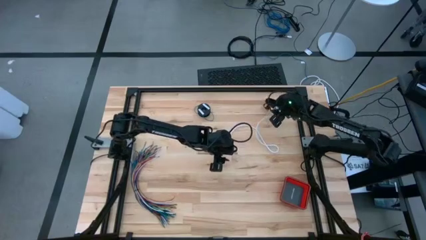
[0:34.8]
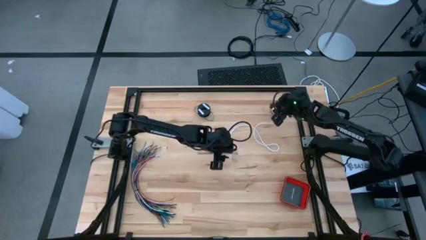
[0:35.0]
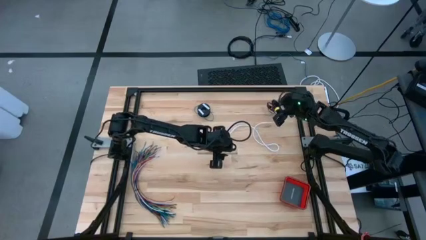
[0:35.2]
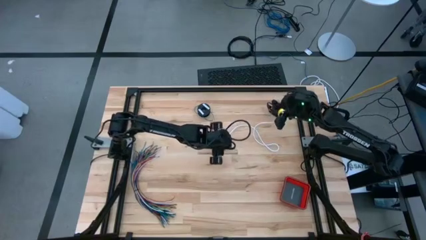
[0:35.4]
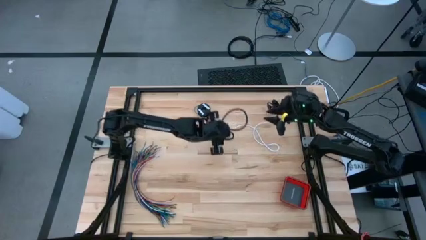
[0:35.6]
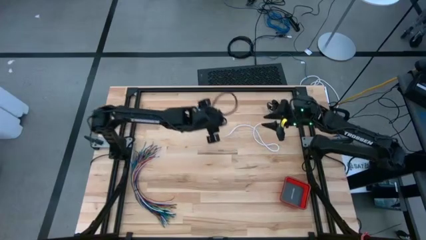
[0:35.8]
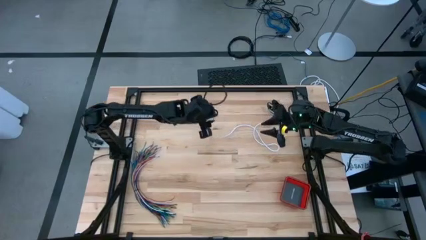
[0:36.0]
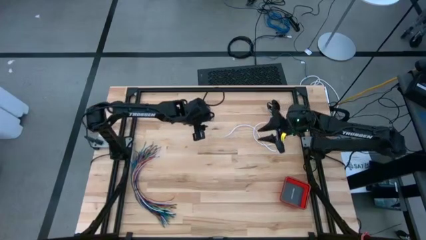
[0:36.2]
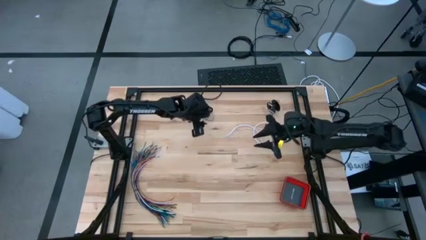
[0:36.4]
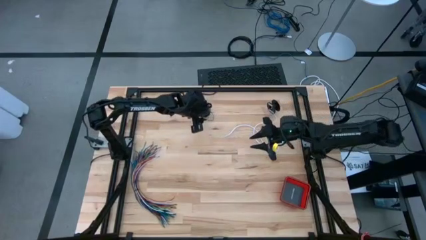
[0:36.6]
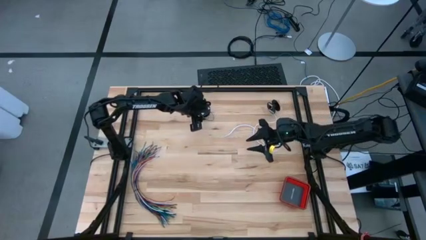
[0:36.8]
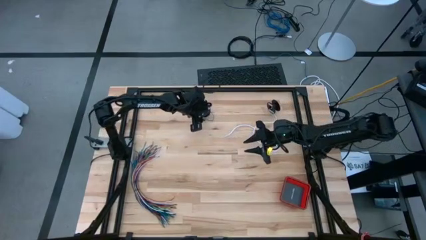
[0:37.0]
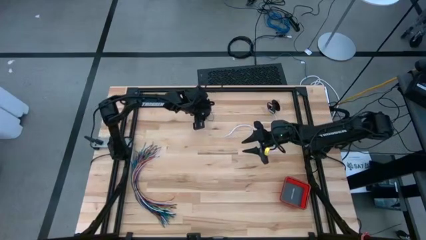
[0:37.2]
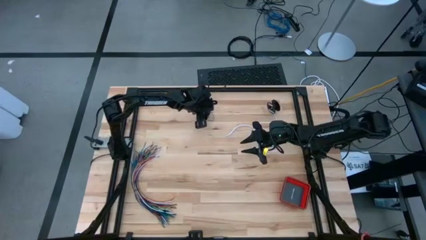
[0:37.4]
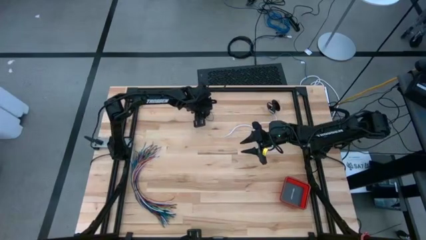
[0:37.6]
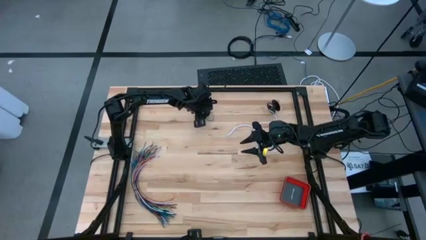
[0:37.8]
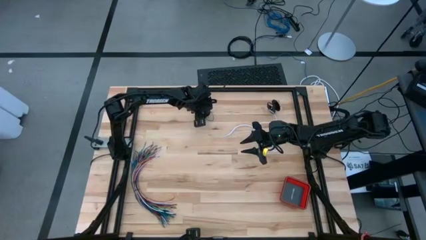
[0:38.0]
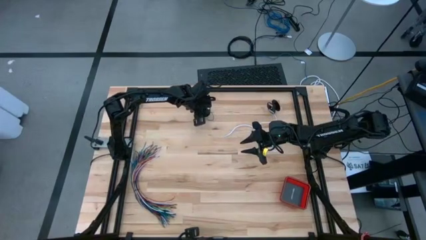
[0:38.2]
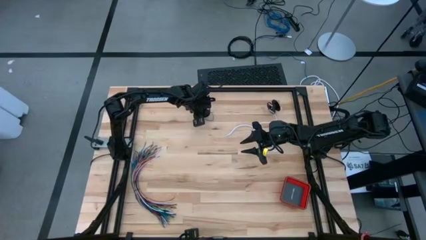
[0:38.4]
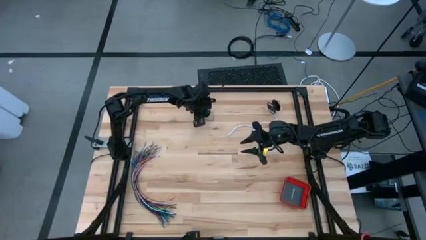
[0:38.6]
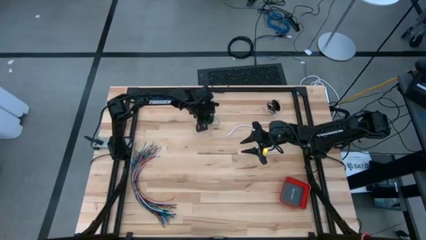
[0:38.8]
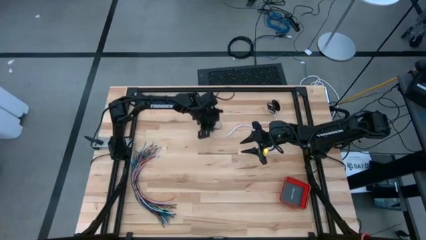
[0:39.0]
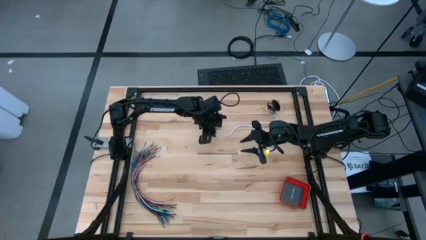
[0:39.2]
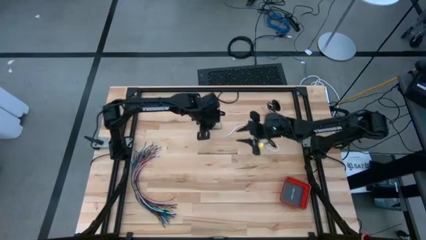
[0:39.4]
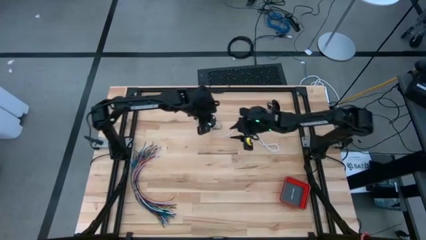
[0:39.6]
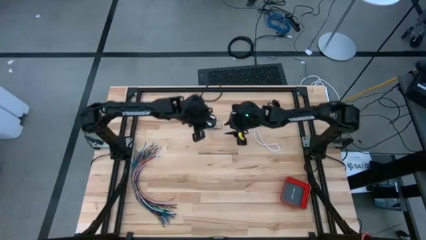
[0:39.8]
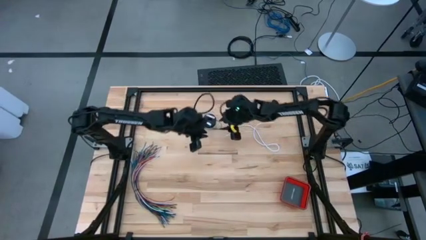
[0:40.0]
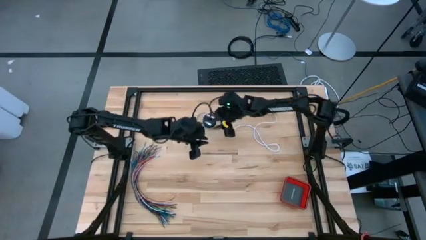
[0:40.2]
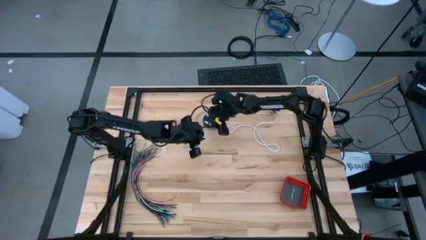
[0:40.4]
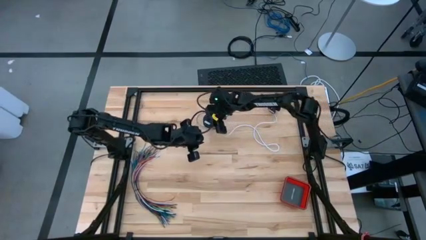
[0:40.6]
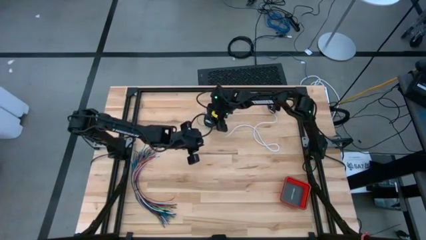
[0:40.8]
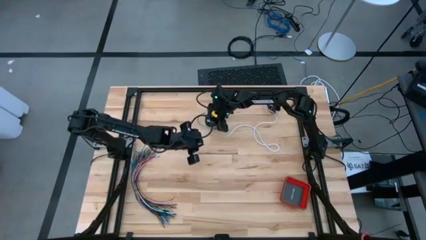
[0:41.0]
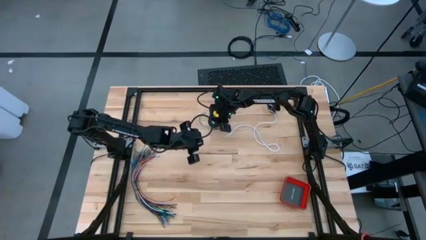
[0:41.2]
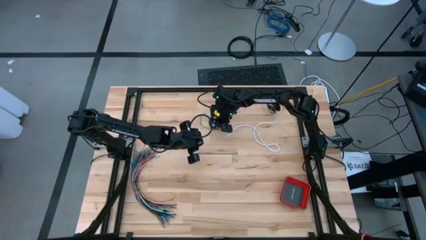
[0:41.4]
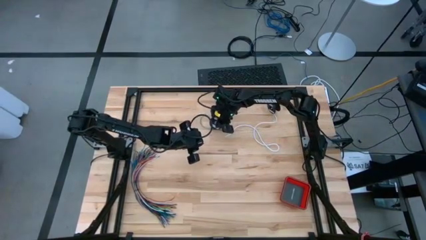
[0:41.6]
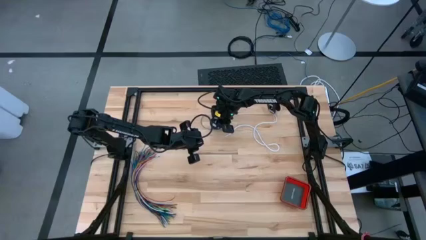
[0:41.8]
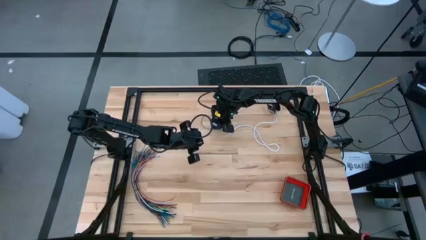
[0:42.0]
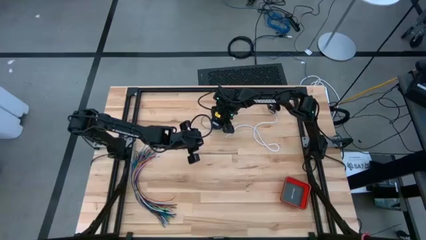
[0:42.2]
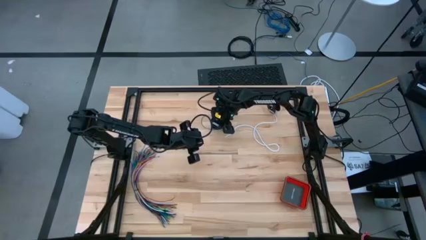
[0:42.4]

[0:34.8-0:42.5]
Task: Coil cords
Uncoil the green wire from the spool

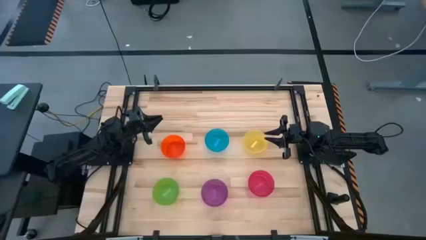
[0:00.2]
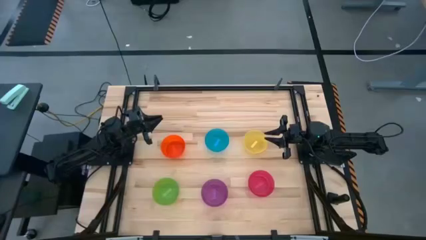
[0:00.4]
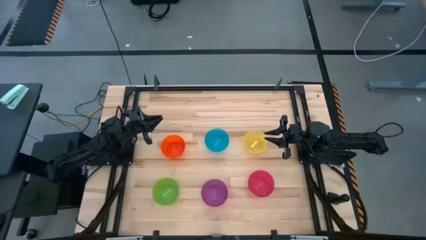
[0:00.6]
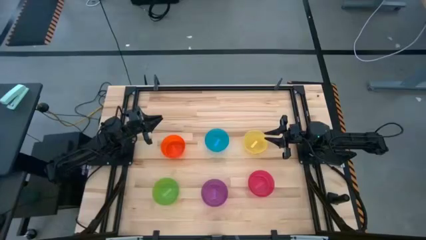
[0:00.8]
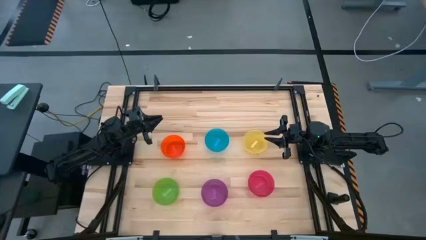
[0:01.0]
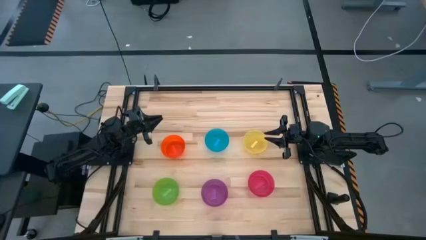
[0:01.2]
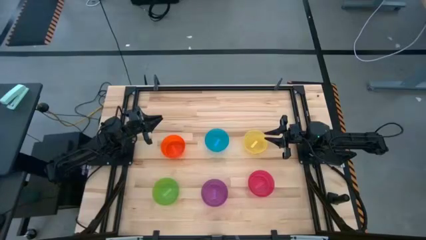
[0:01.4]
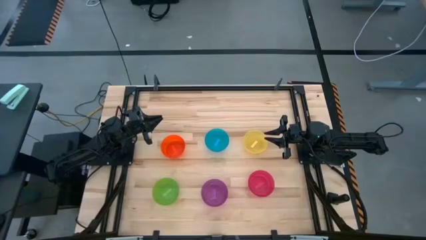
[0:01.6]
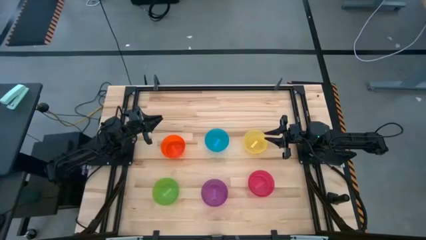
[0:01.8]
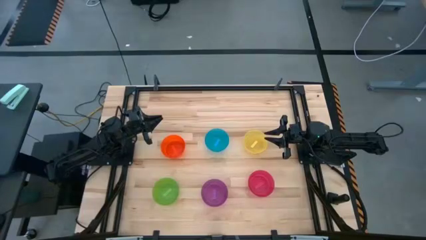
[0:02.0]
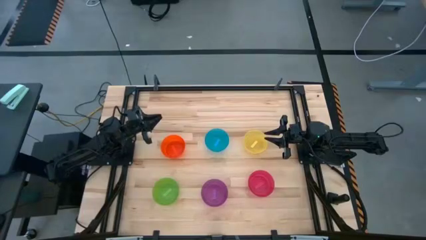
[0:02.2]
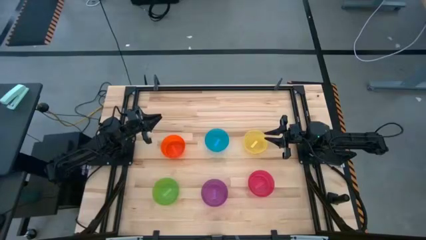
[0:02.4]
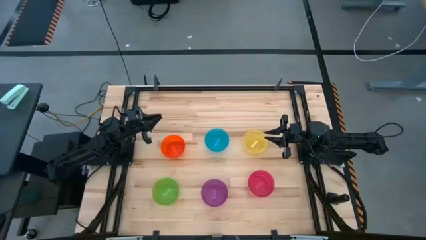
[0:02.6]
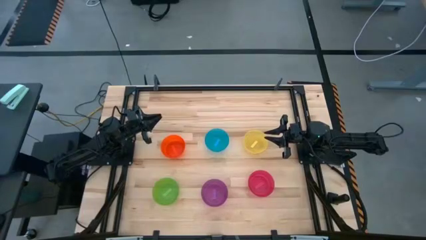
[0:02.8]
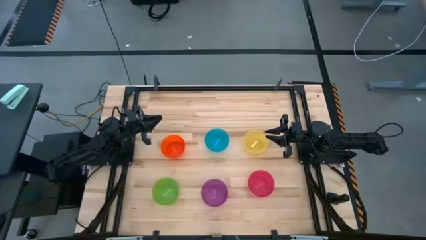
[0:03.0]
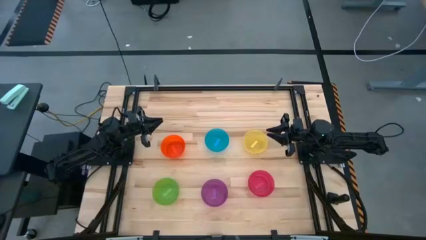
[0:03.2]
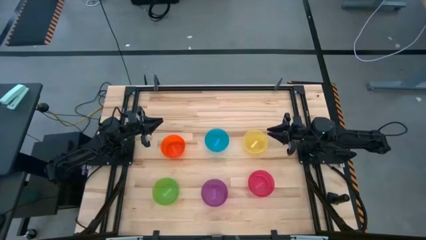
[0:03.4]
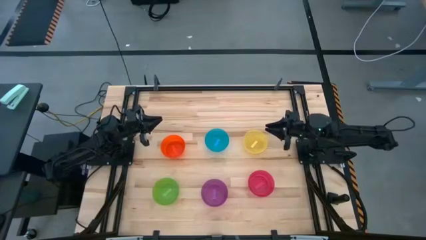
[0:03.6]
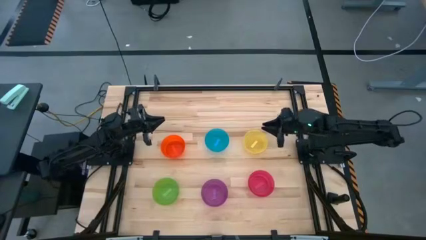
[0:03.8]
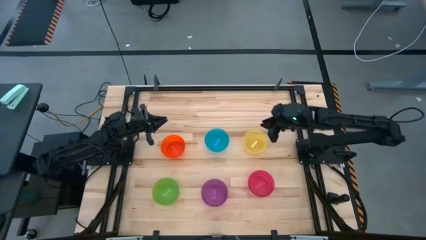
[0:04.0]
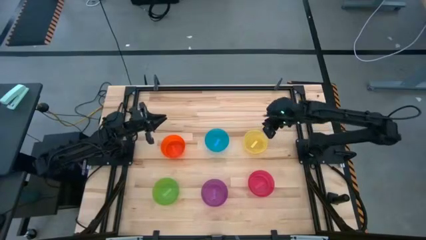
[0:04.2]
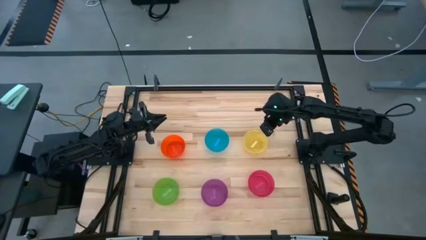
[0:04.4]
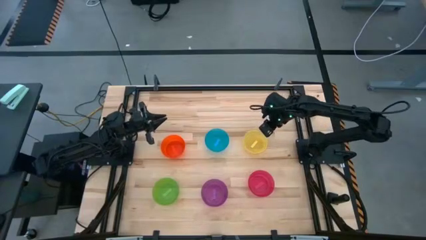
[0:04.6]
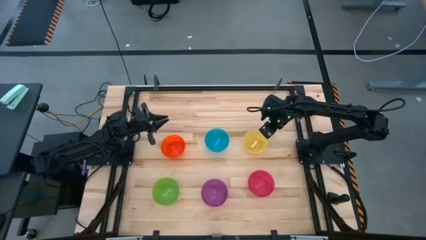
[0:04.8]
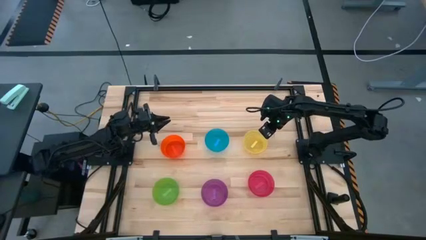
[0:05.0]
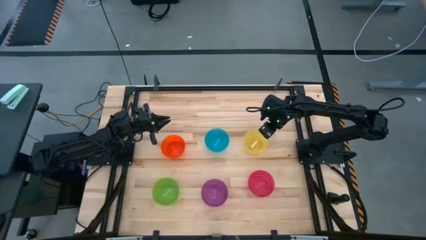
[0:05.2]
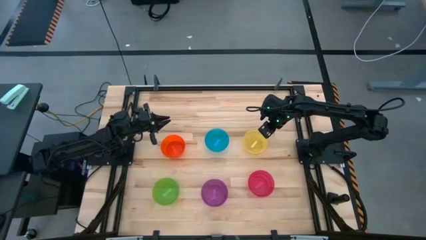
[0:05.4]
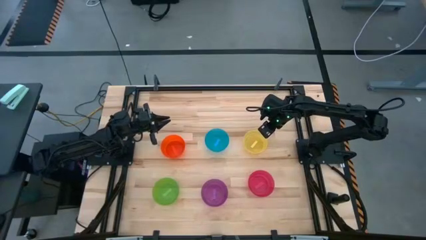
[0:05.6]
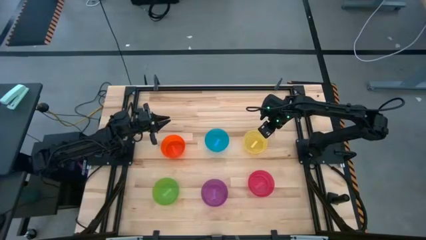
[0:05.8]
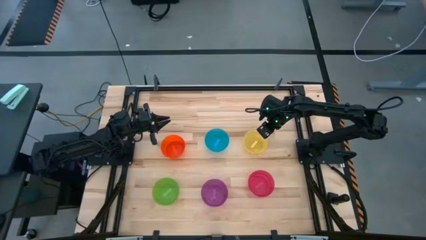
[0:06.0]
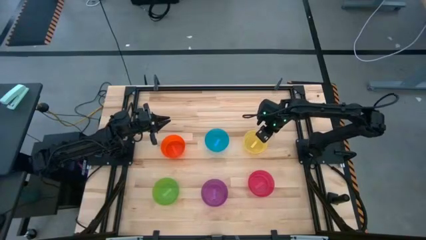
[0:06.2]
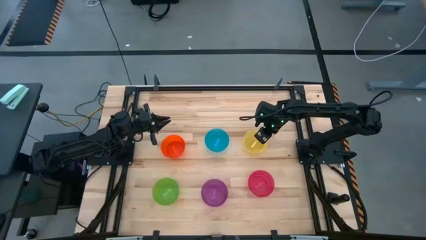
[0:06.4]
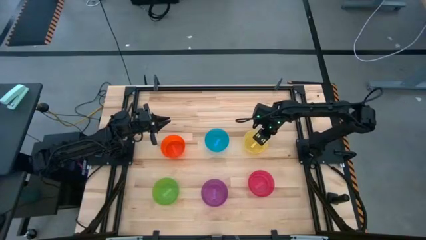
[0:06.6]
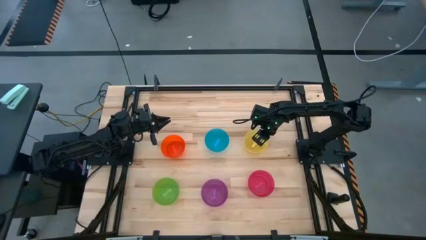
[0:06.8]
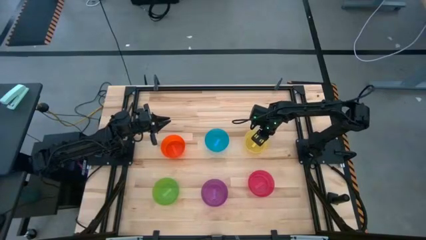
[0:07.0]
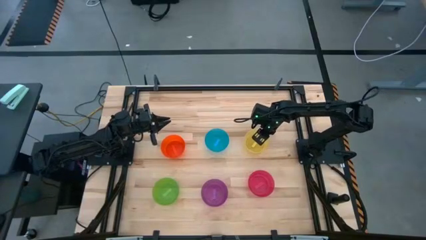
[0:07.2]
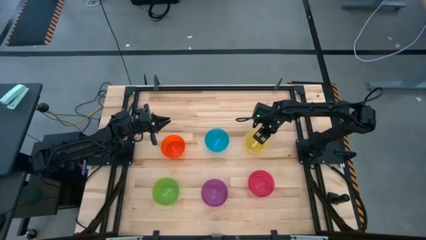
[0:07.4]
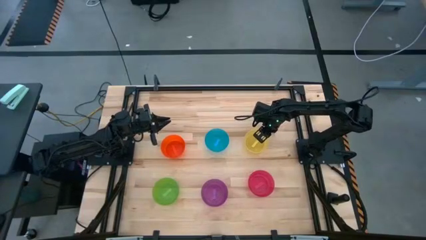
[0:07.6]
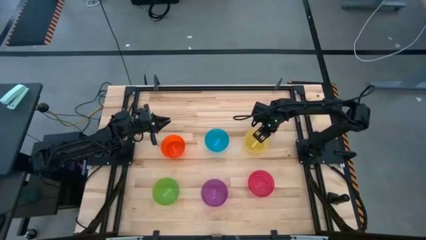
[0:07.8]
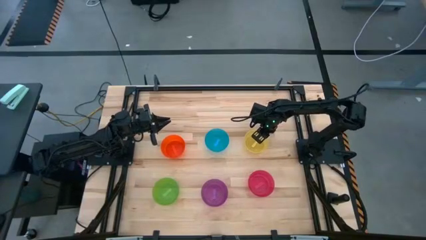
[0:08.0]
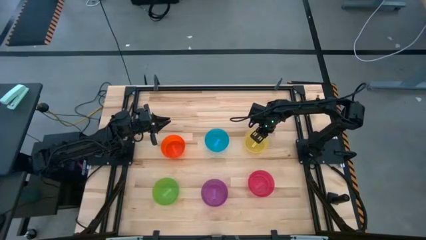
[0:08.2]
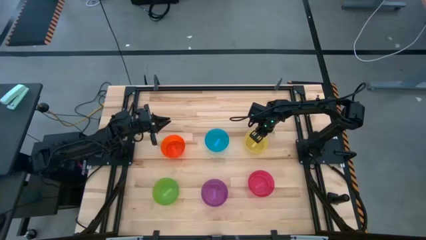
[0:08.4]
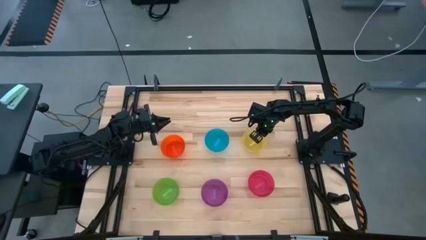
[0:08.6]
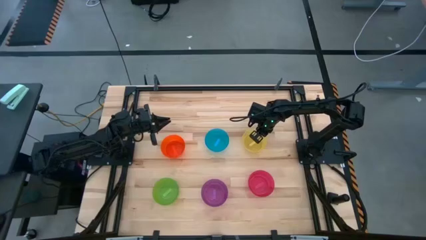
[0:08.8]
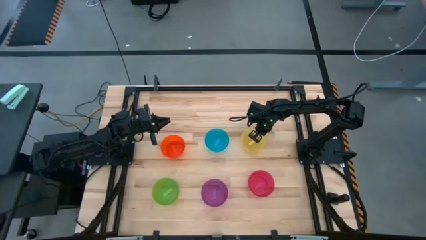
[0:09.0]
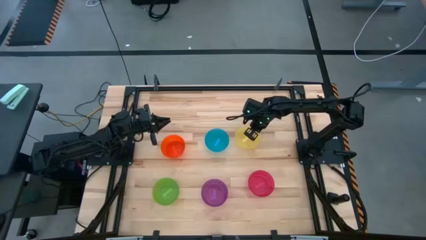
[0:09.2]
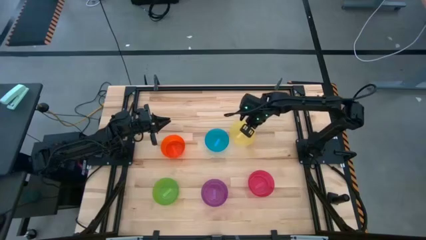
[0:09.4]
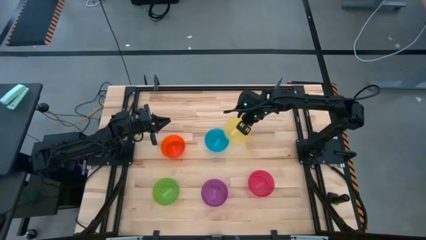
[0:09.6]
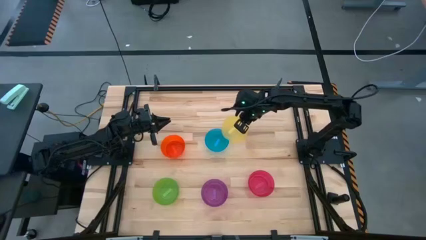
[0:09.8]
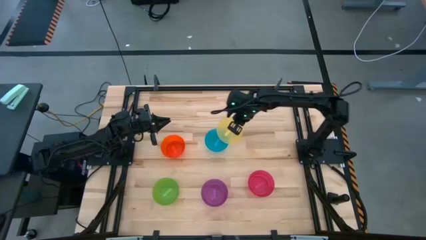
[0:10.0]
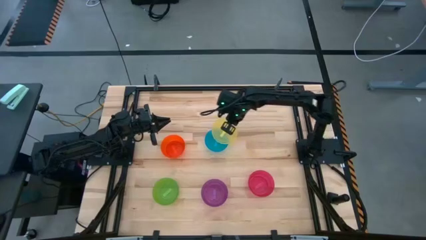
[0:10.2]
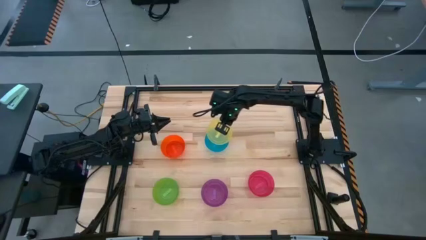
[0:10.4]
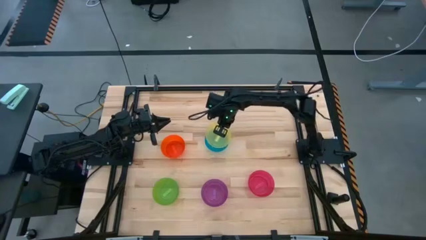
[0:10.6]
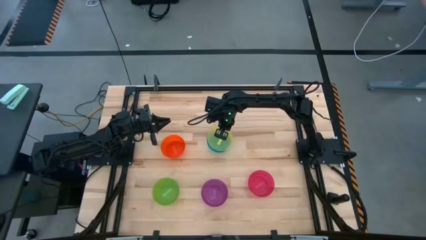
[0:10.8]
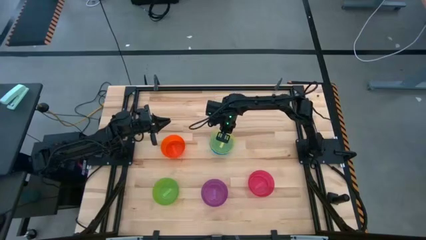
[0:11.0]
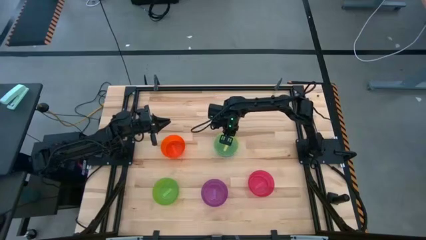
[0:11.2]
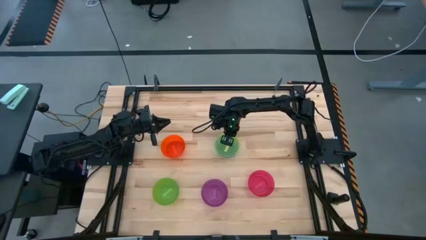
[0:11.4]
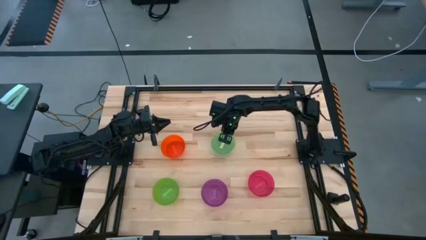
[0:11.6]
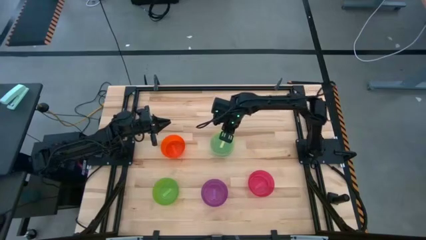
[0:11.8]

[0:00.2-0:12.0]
Task: Nest bowls inside each other
Stack the yellow bowl on top of the blue bowl
